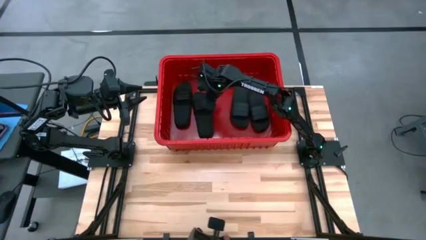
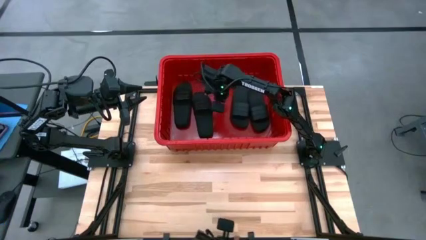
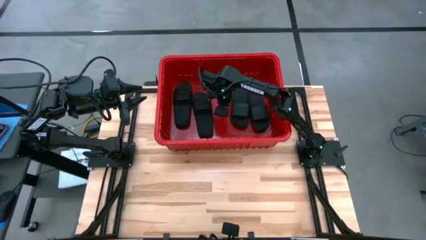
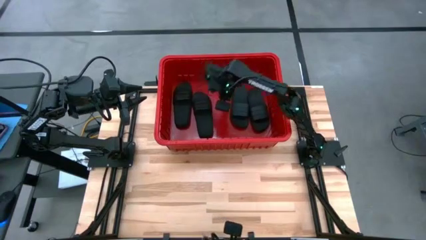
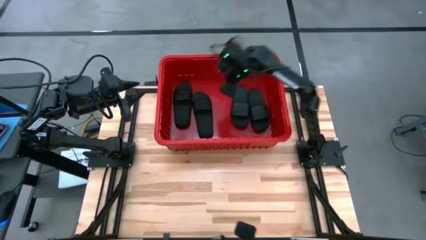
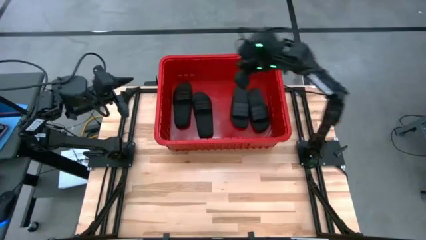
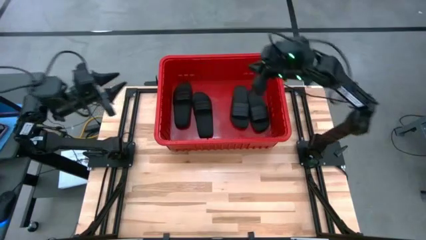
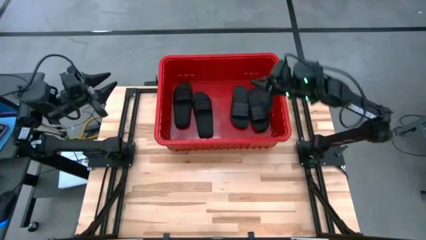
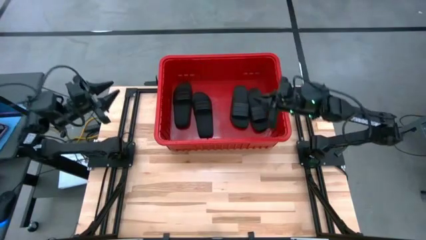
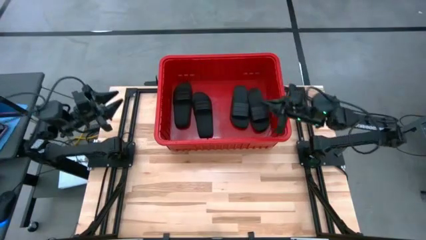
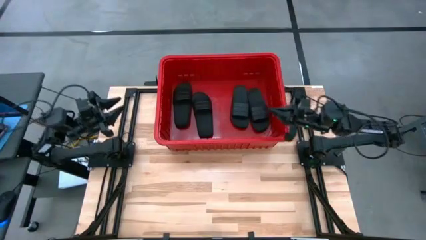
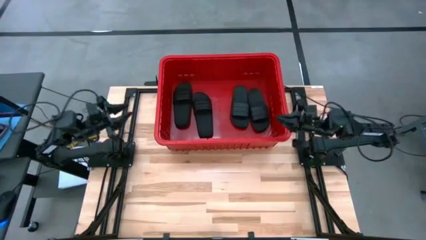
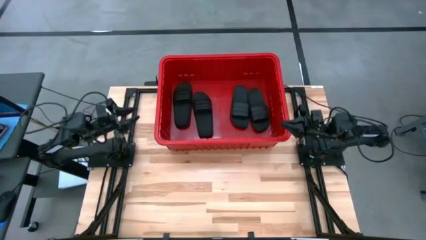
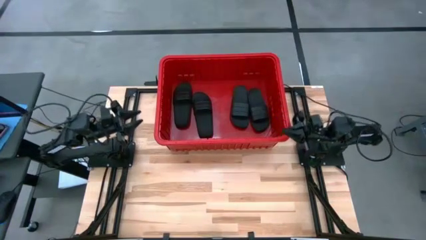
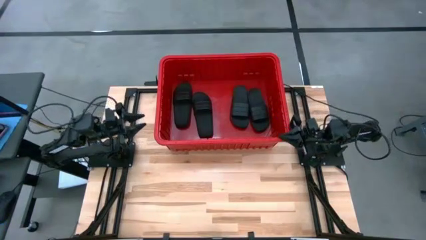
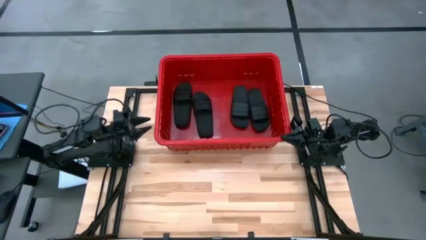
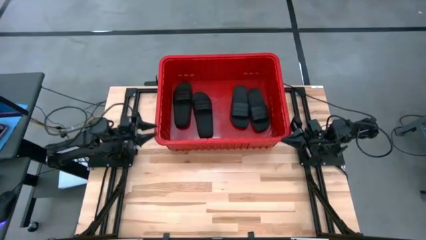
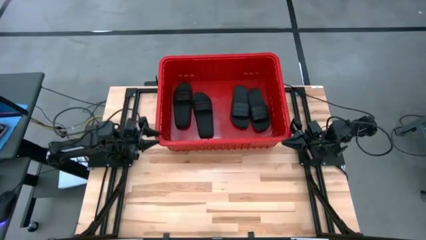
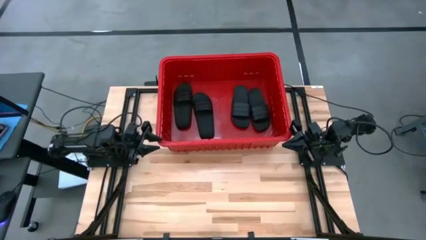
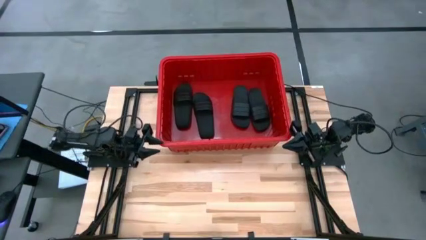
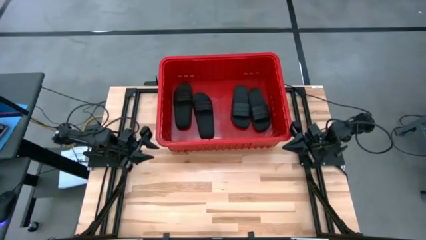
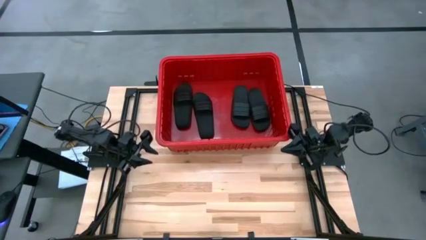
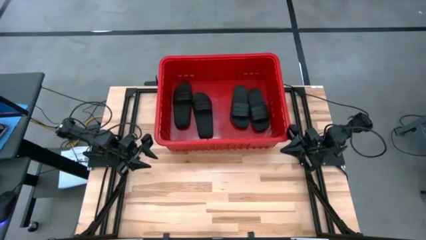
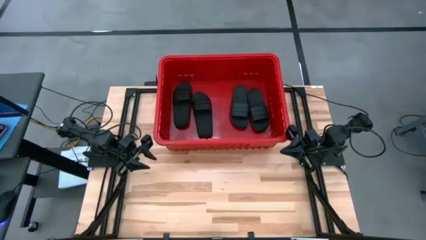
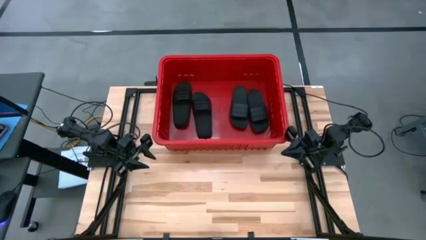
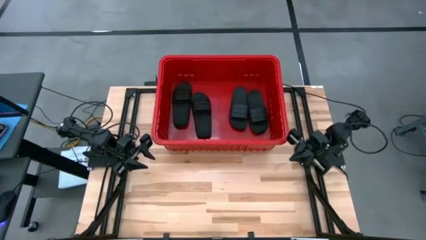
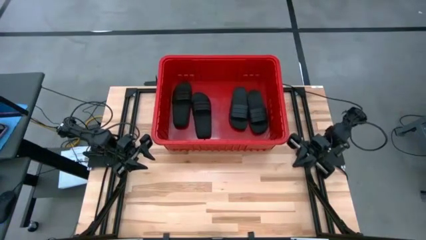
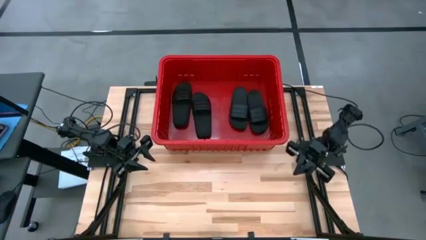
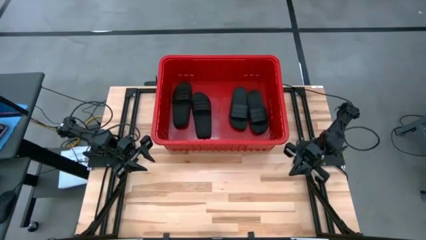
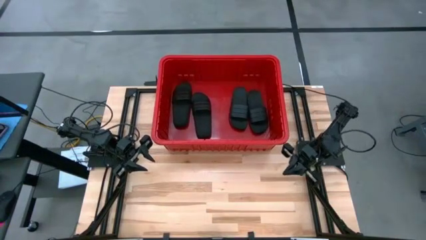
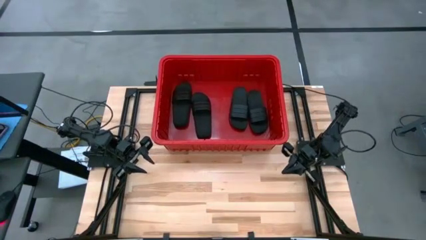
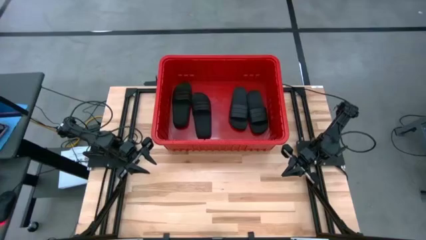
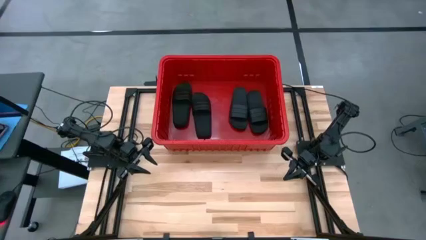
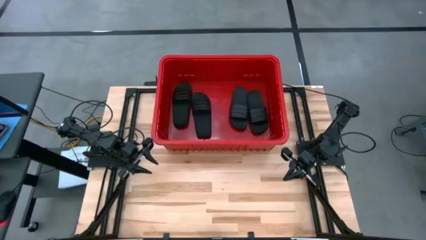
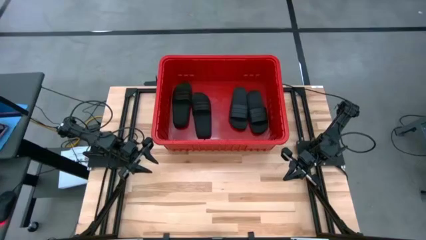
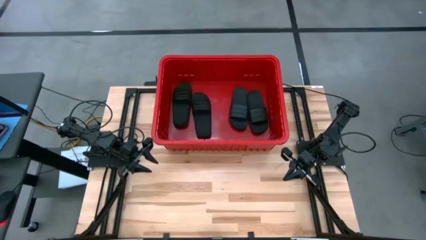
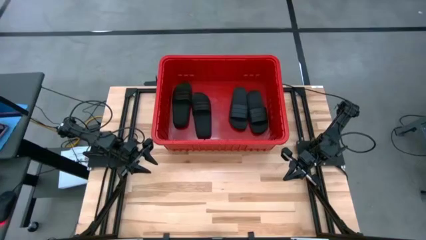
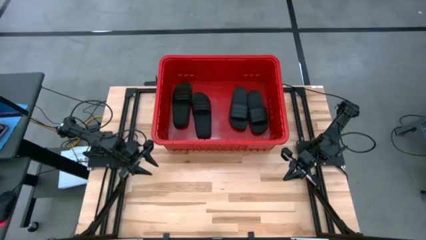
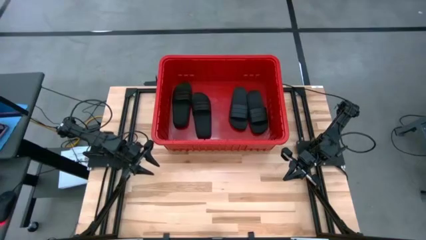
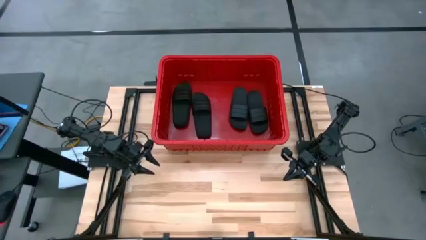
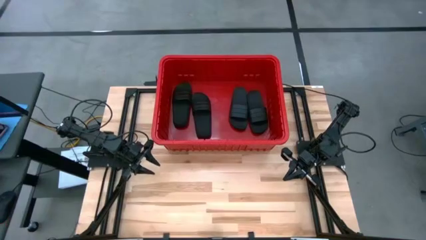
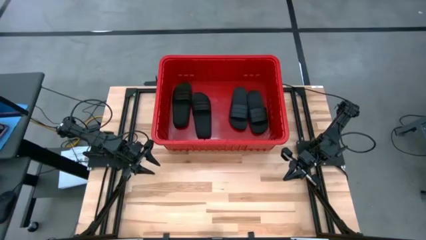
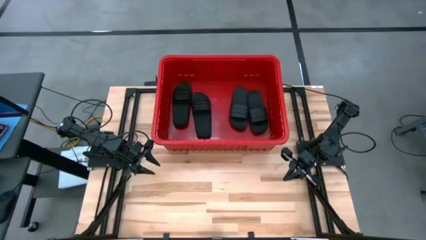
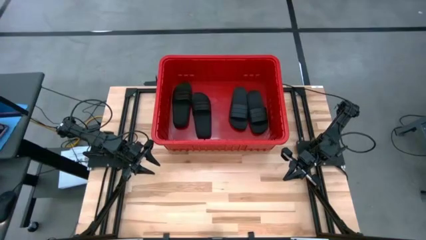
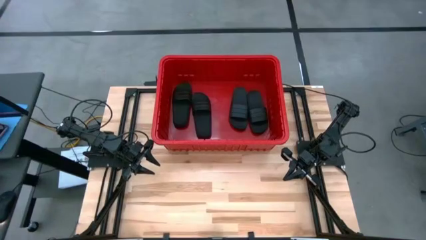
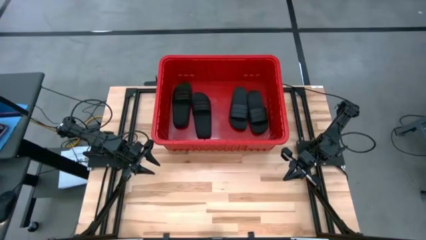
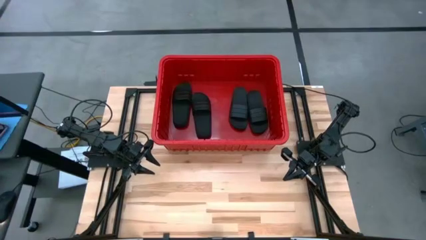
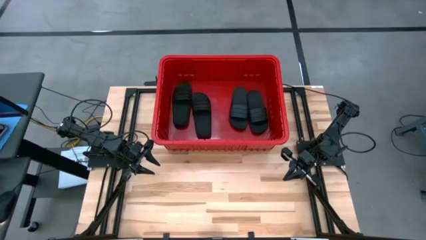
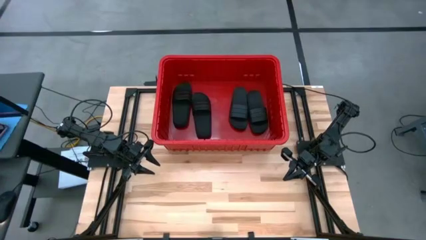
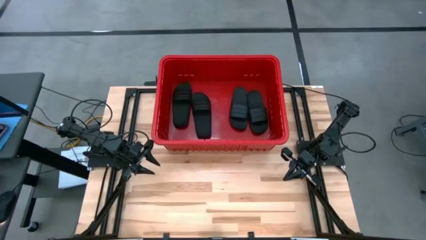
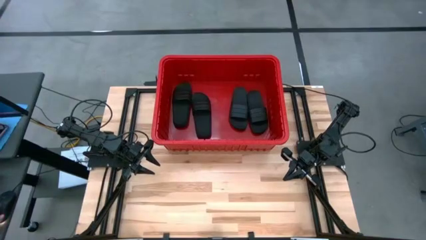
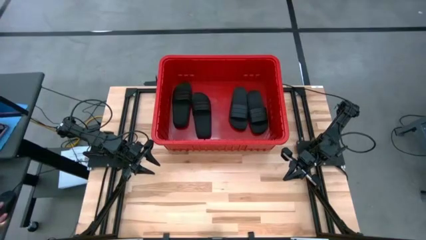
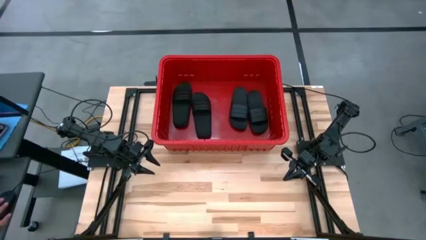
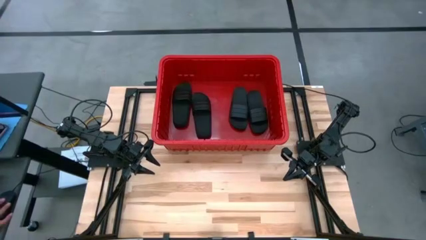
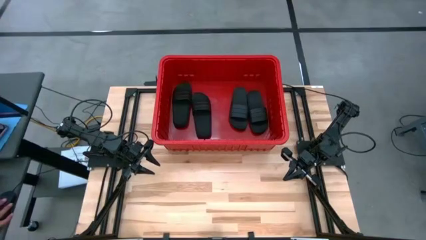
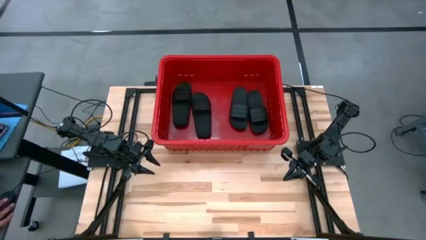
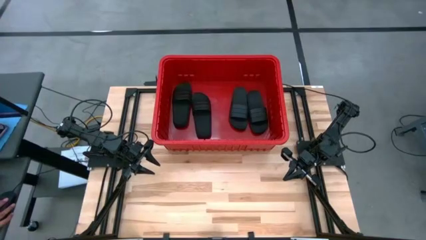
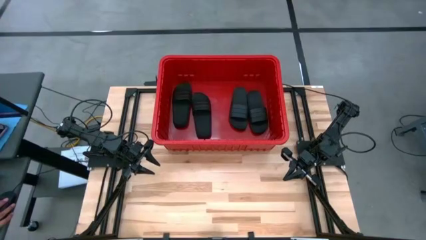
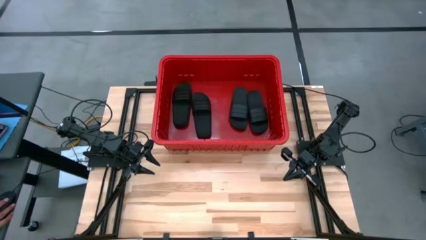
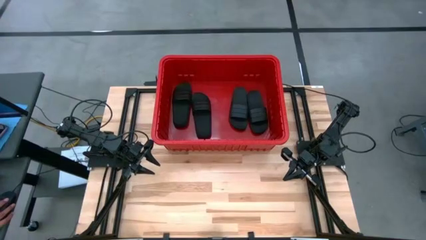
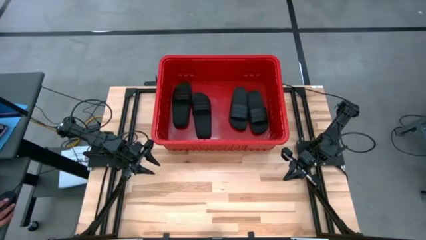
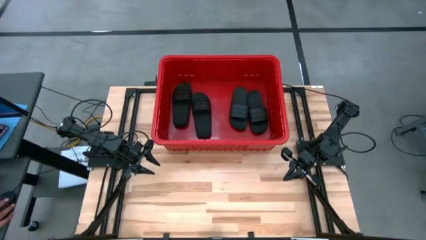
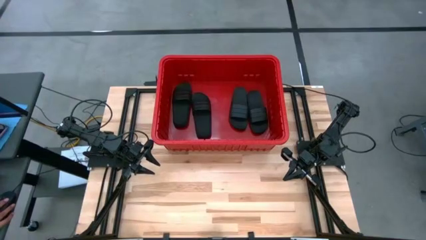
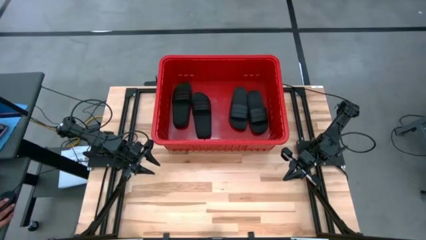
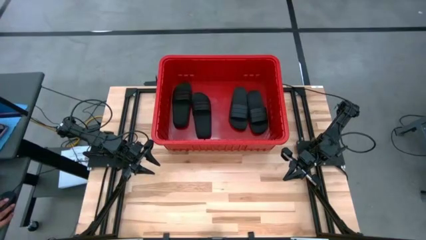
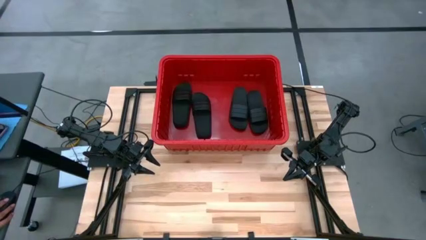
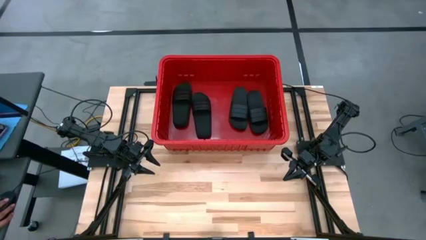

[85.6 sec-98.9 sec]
Task: Pick and place slides into bin
Return to Home Position
